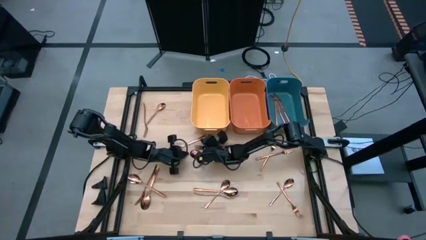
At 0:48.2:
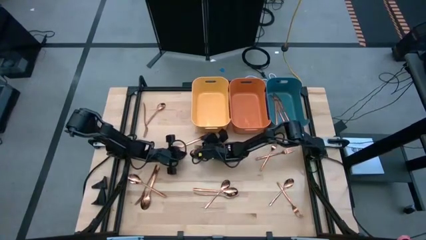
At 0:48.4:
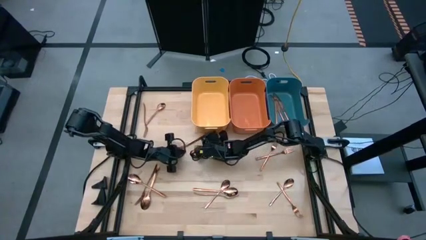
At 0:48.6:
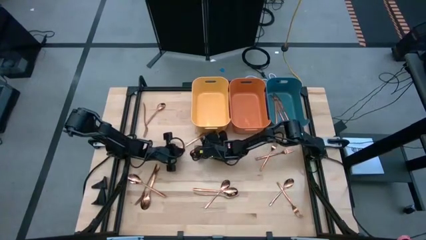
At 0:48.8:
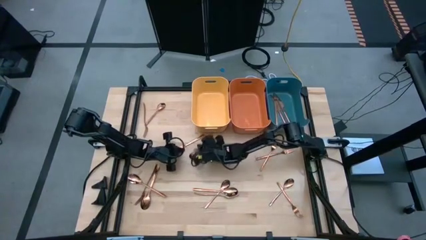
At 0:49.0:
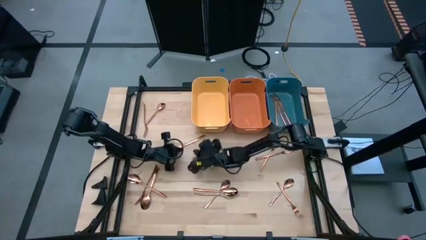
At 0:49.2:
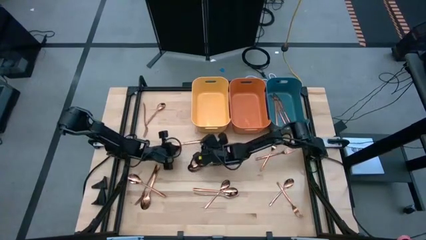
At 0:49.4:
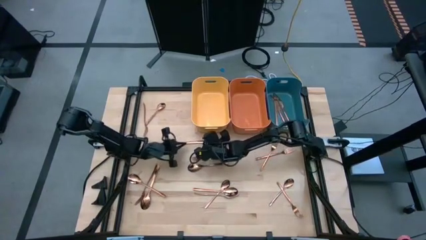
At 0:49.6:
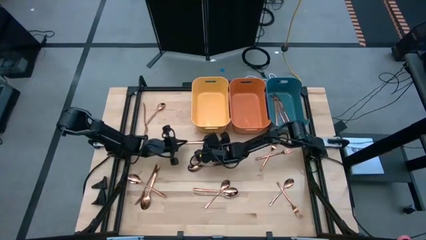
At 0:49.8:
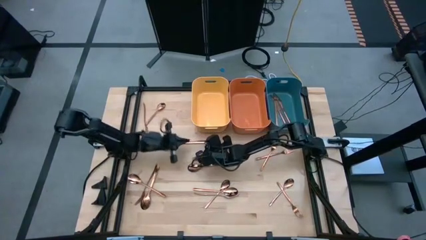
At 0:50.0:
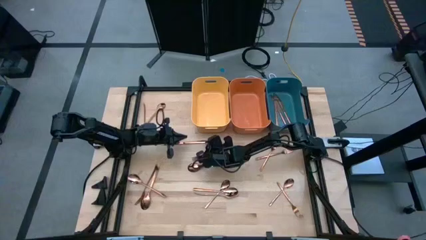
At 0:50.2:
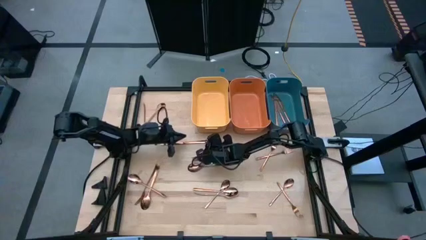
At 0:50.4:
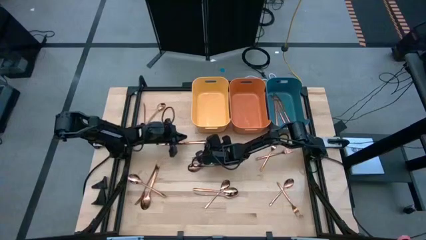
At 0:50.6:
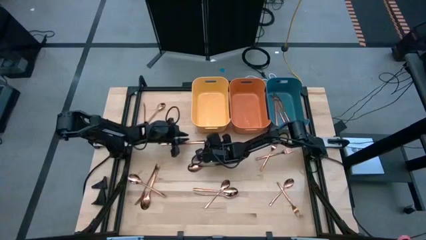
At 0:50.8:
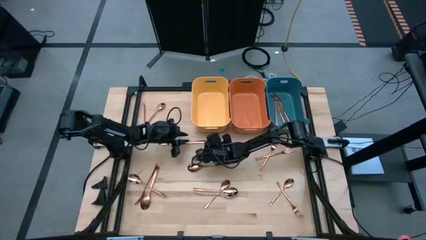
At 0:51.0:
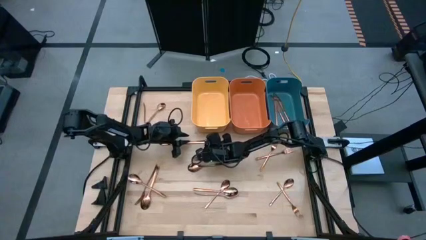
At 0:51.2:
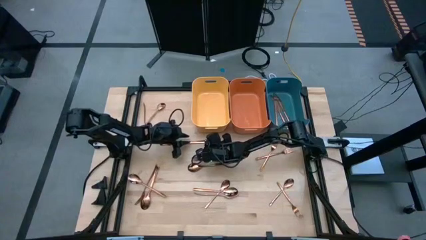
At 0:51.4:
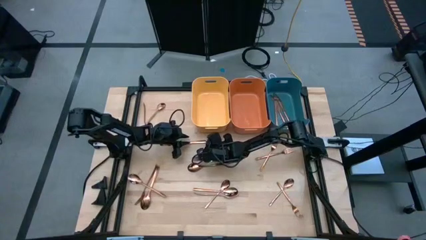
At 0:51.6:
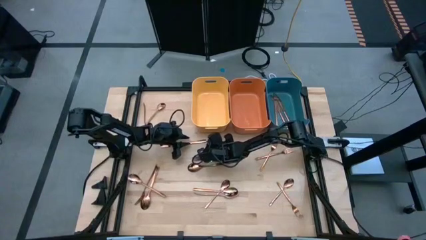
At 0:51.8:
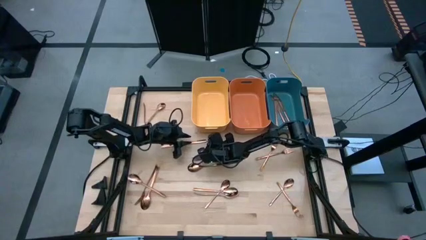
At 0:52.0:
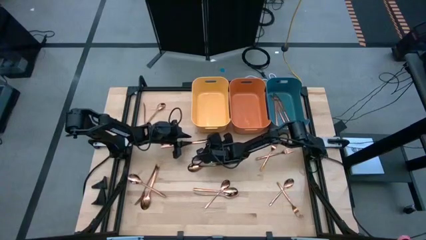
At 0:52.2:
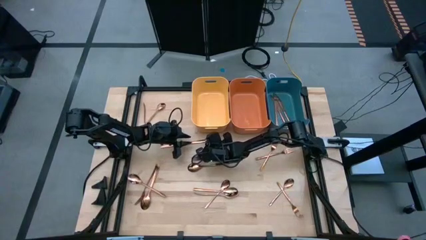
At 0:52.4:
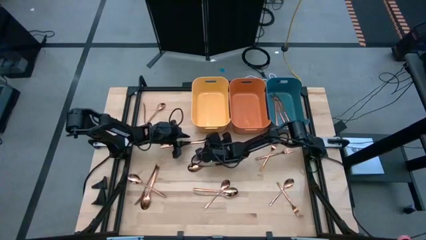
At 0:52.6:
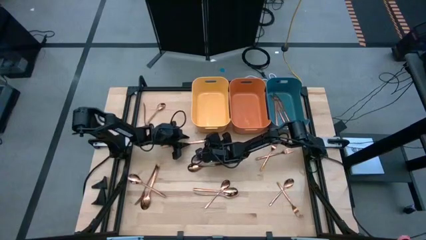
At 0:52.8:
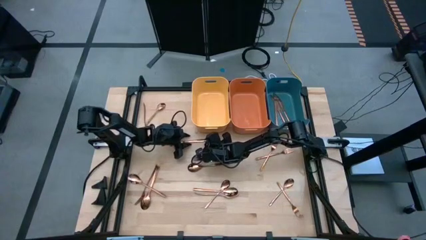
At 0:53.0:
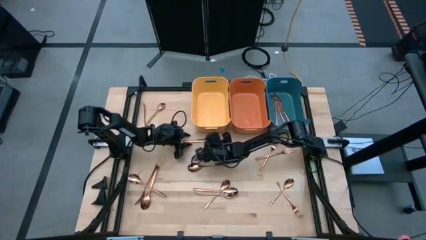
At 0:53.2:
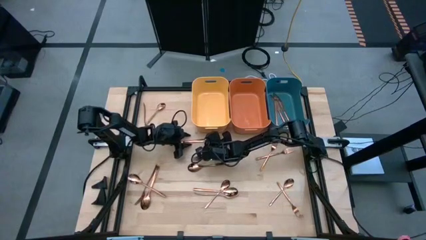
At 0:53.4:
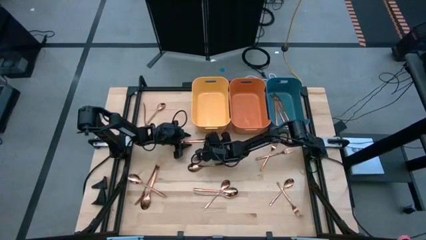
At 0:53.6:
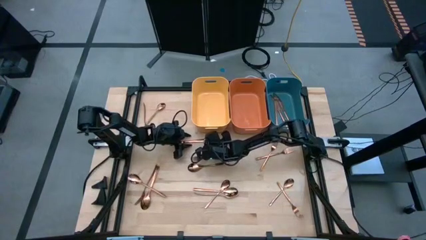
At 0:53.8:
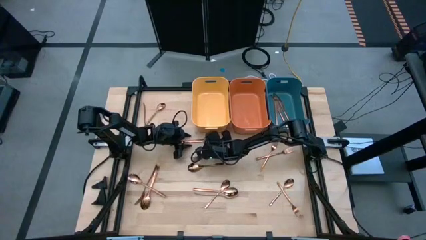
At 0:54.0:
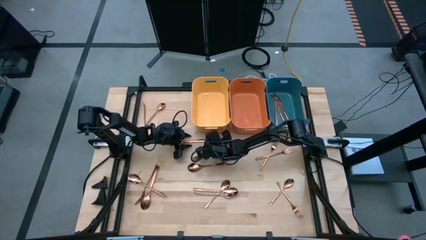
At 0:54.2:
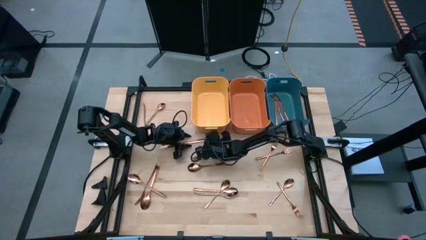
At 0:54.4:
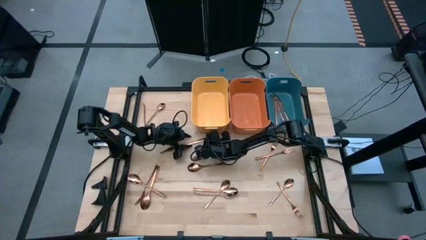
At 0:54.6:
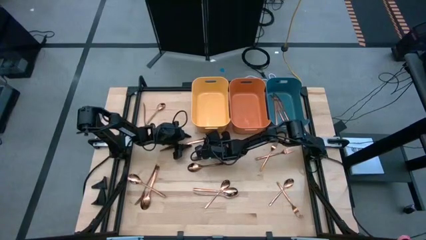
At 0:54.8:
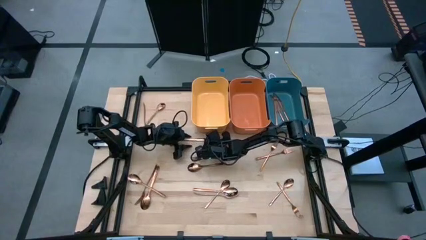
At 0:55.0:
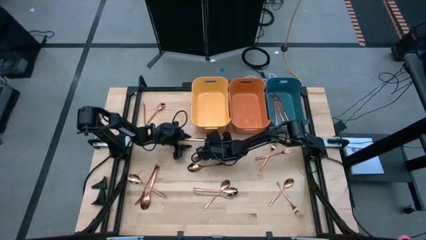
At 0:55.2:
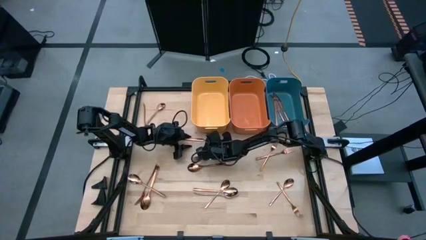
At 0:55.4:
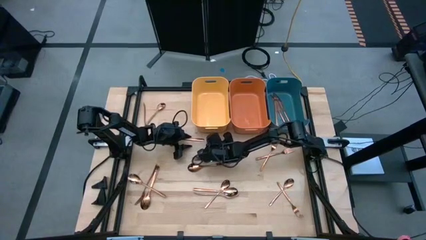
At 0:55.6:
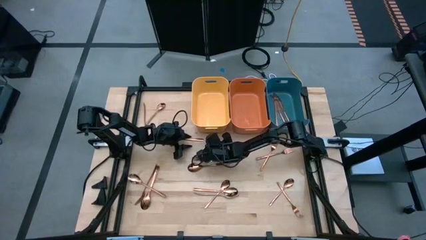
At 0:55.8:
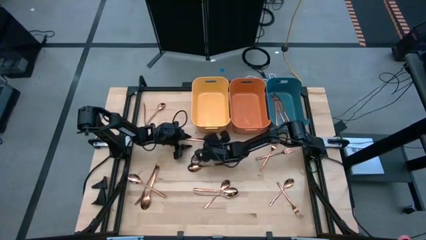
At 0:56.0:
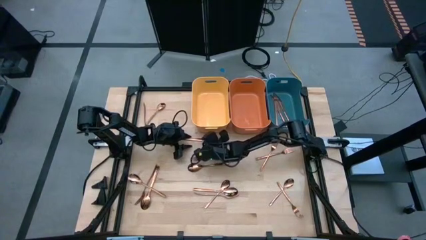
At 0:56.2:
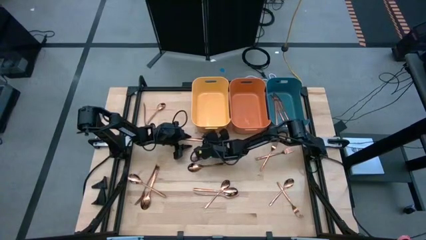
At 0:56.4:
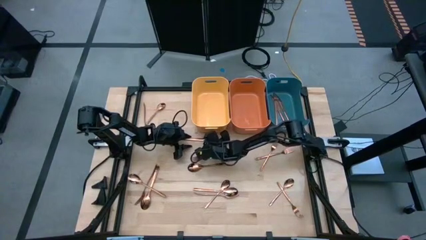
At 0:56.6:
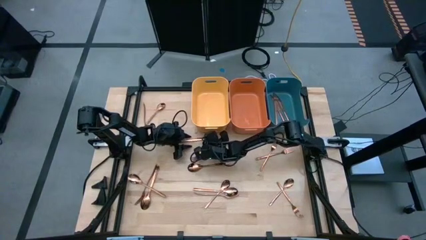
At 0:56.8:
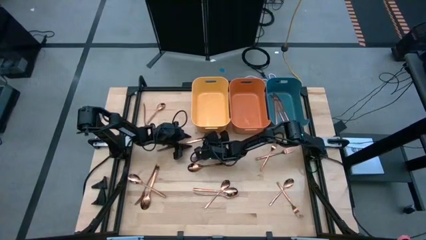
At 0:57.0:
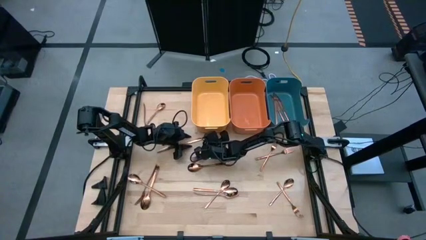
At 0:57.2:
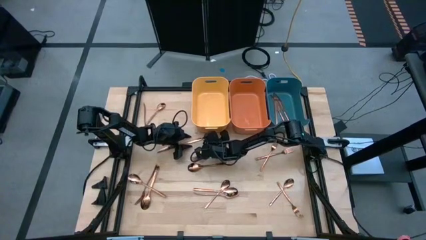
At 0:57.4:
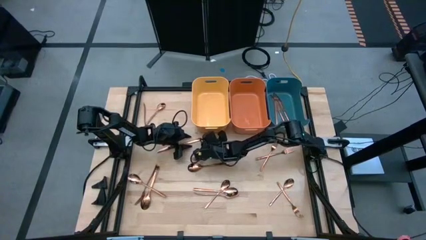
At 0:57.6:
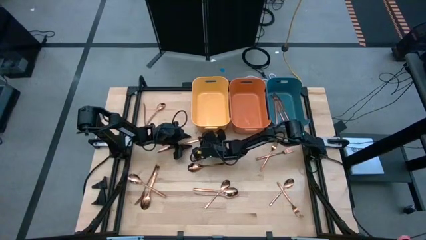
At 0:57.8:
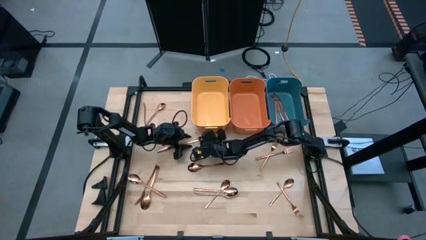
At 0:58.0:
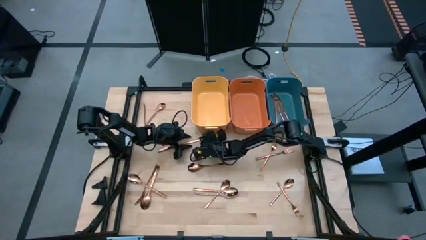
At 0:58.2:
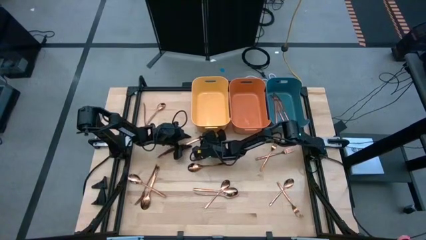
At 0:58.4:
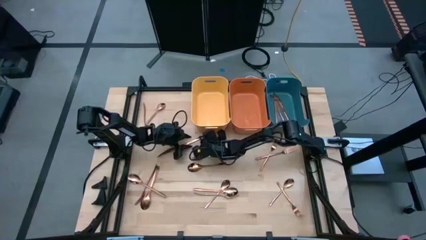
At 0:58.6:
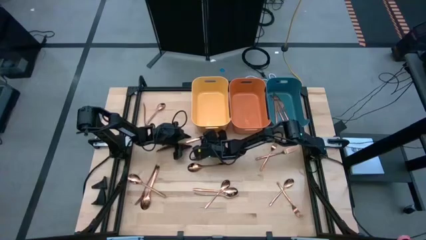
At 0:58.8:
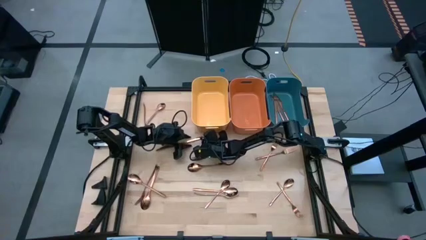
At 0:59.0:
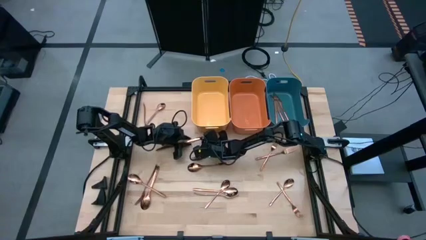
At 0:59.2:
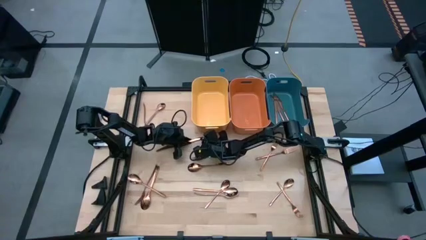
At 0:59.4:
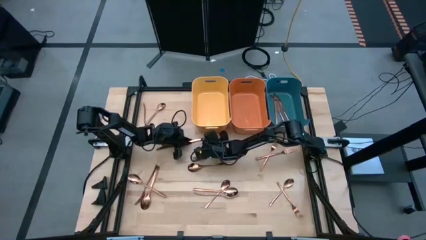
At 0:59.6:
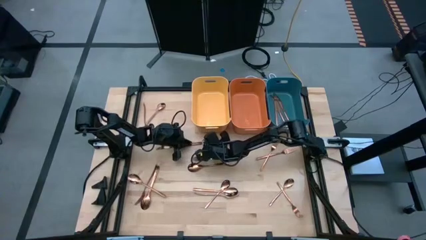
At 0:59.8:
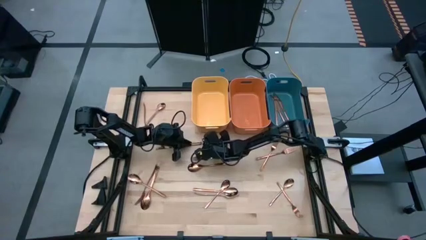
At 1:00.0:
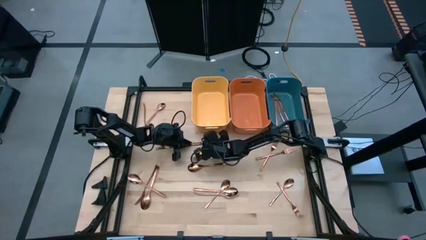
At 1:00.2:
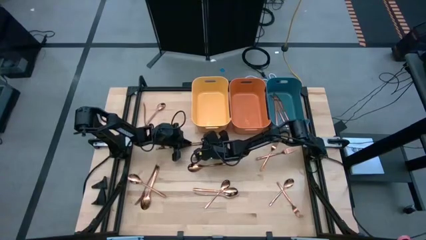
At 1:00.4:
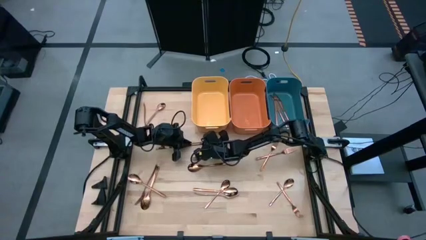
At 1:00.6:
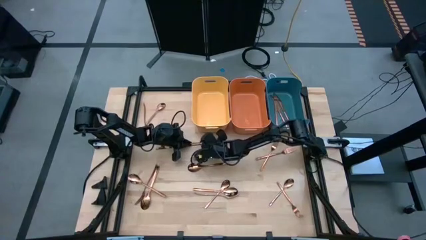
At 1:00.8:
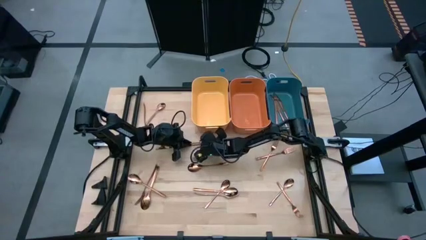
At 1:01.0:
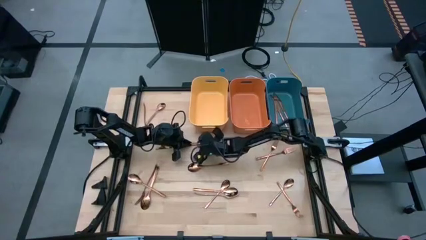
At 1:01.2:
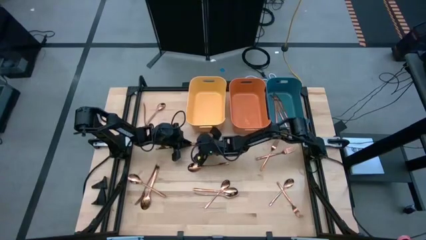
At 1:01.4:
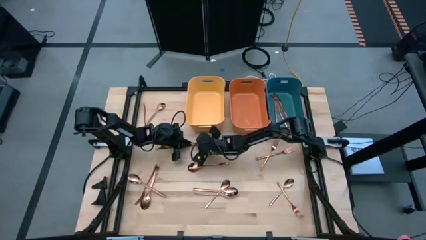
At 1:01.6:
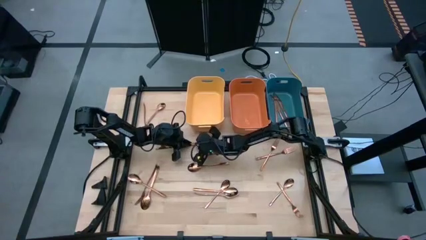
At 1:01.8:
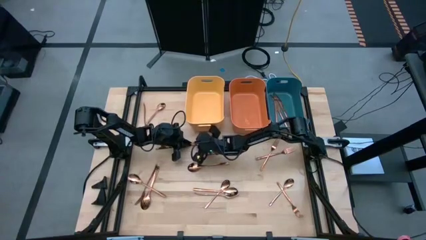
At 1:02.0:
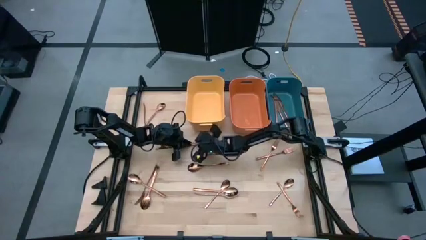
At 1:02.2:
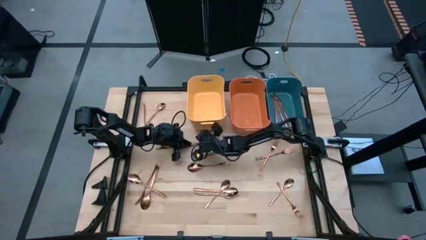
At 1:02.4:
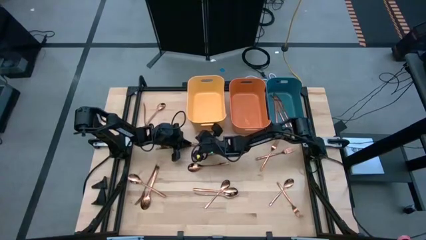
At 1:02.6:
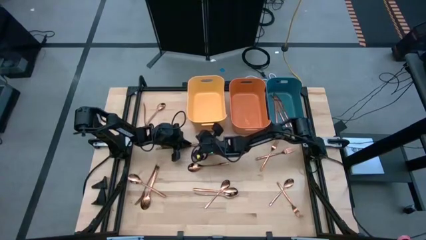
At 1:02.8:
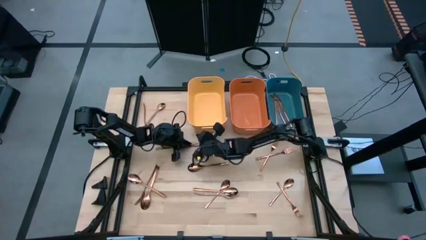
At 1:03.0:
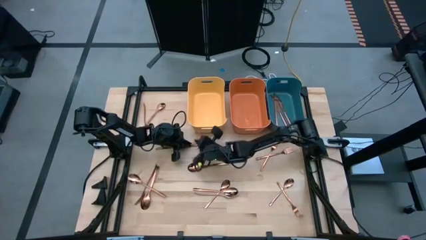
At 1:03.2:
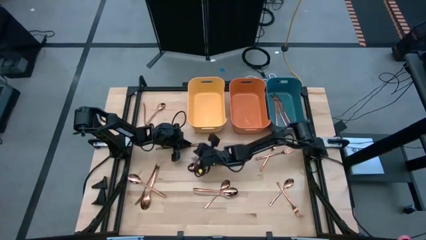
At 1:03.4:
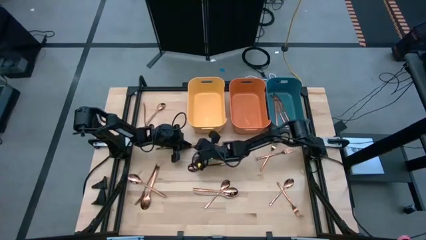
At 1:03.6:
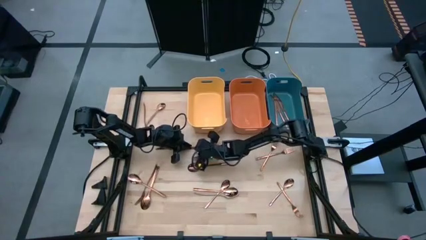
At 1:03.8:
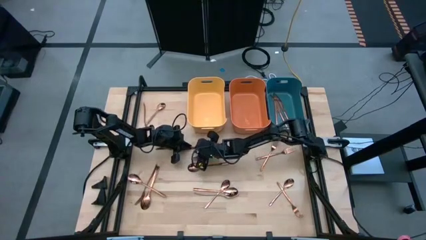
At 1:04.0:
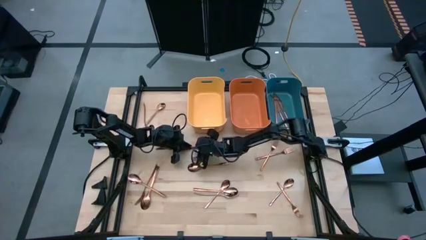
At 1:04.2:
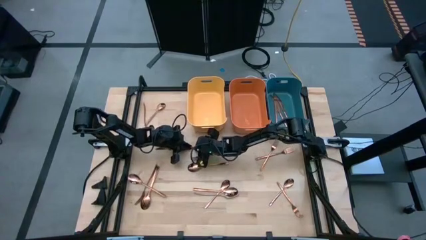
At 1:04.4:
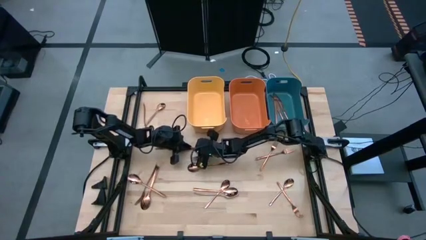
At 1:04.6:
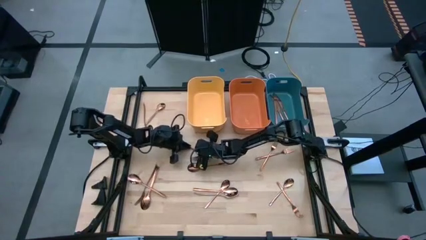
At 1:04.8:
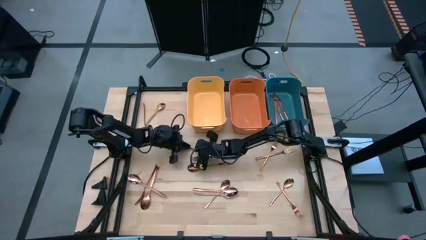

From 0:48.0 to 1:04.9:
Task: Sort silverware
Put the copper knife into the blue bin
